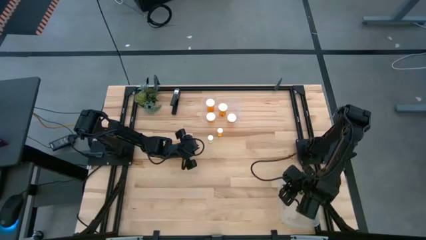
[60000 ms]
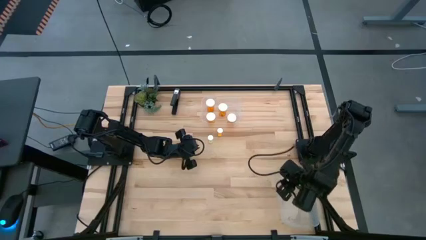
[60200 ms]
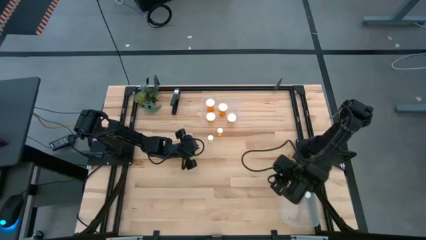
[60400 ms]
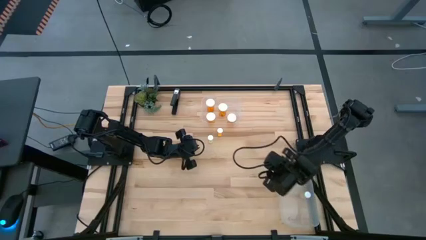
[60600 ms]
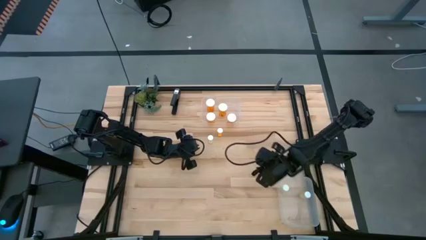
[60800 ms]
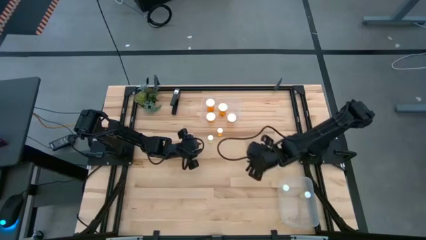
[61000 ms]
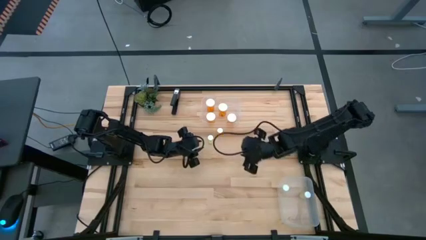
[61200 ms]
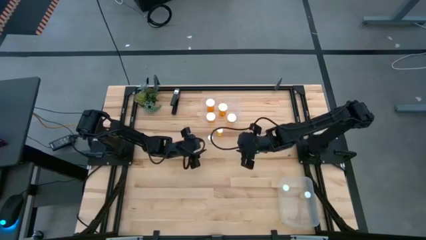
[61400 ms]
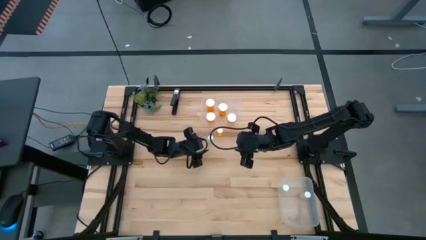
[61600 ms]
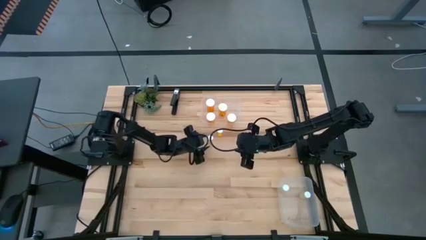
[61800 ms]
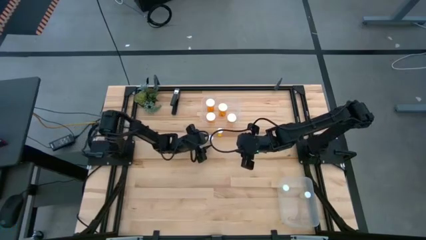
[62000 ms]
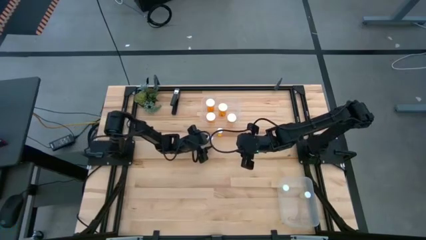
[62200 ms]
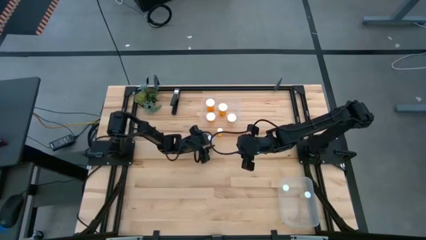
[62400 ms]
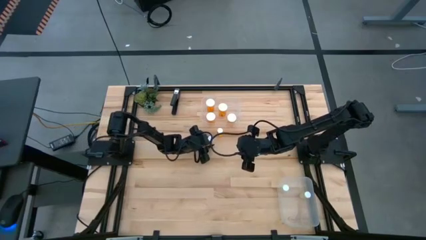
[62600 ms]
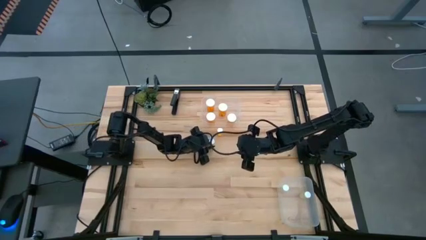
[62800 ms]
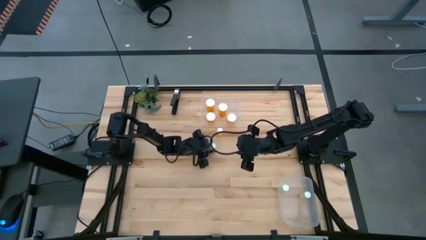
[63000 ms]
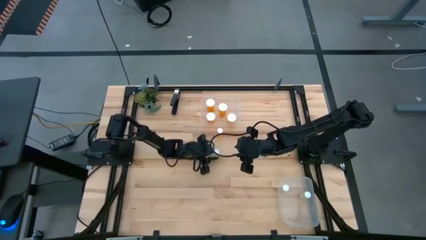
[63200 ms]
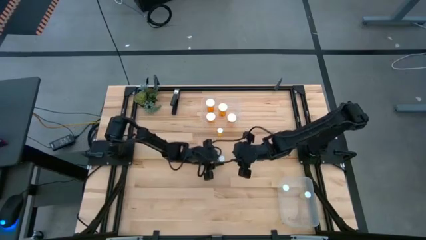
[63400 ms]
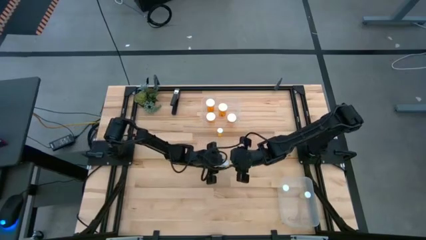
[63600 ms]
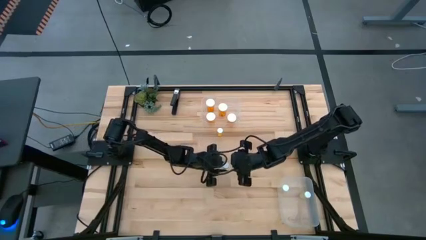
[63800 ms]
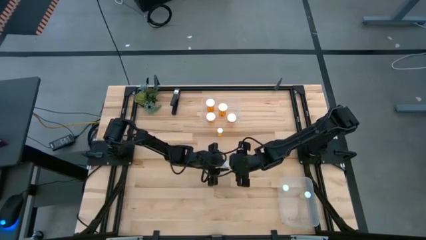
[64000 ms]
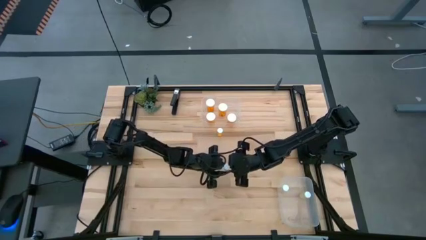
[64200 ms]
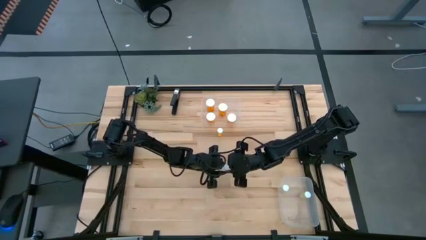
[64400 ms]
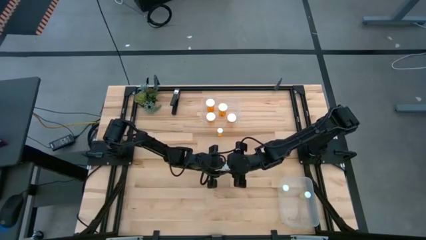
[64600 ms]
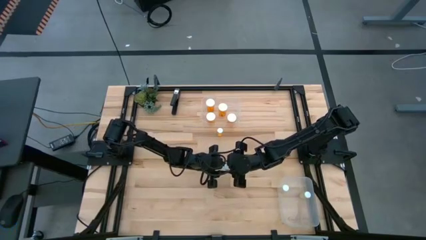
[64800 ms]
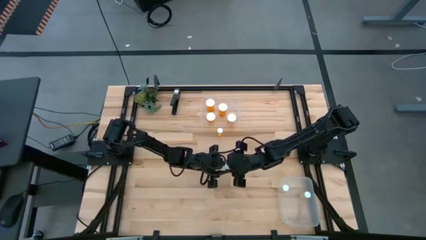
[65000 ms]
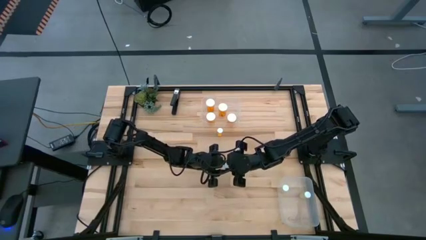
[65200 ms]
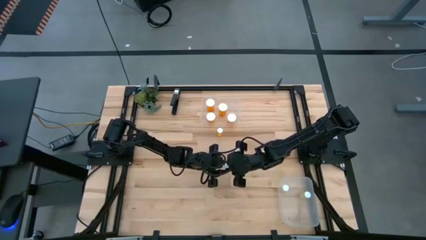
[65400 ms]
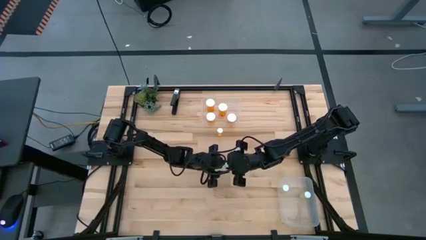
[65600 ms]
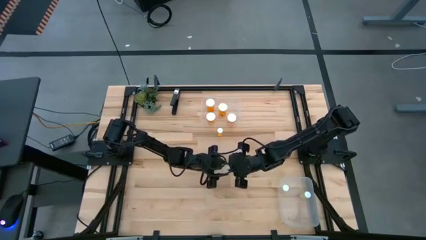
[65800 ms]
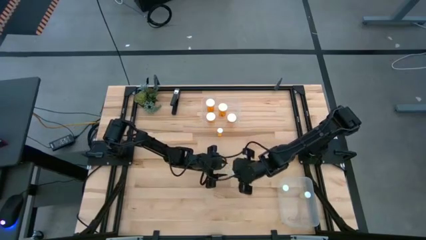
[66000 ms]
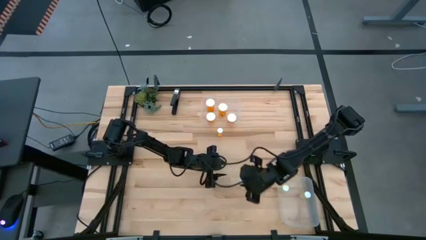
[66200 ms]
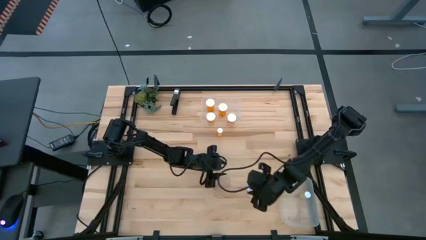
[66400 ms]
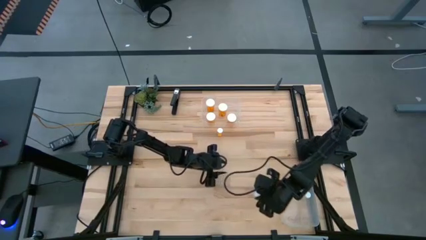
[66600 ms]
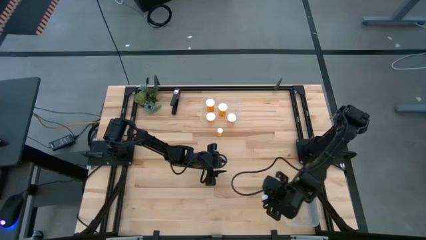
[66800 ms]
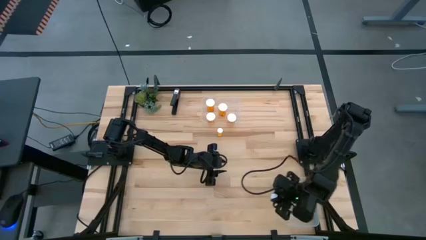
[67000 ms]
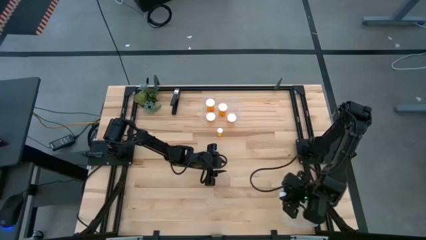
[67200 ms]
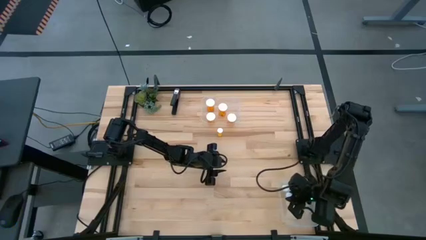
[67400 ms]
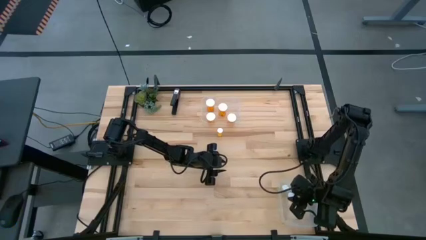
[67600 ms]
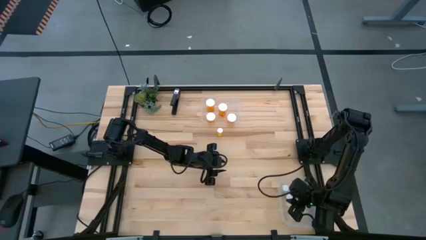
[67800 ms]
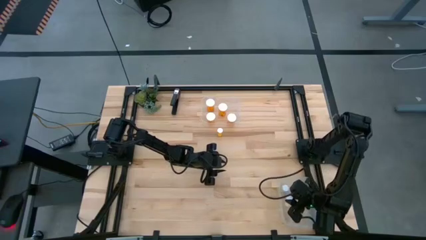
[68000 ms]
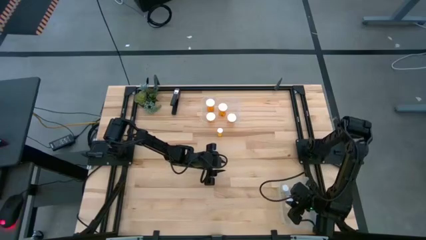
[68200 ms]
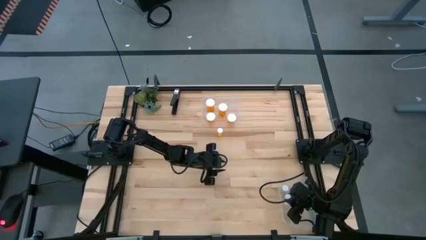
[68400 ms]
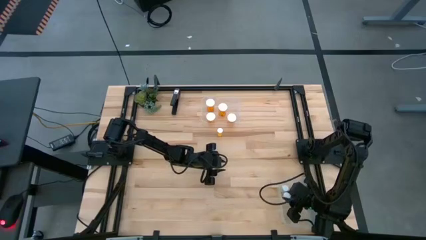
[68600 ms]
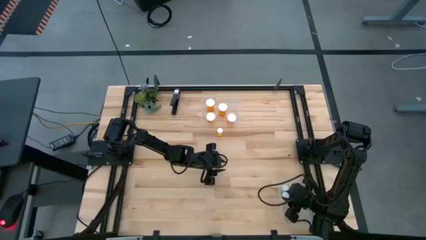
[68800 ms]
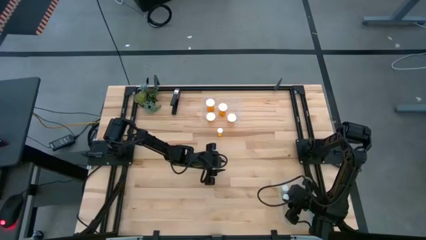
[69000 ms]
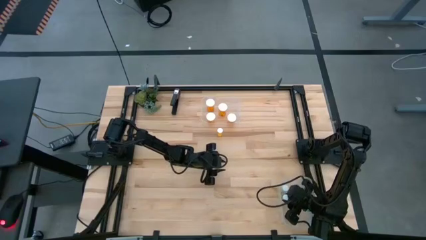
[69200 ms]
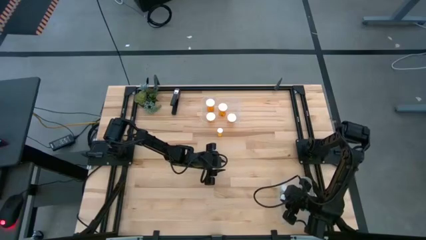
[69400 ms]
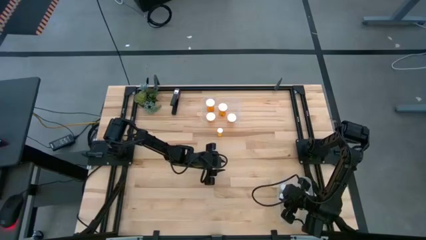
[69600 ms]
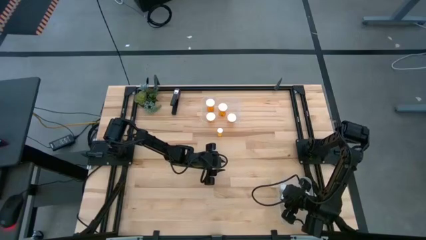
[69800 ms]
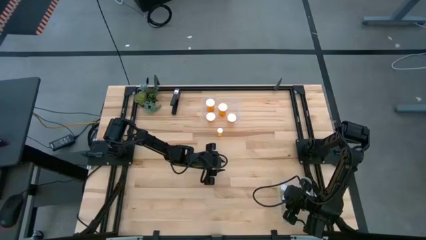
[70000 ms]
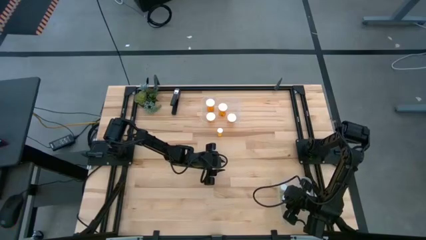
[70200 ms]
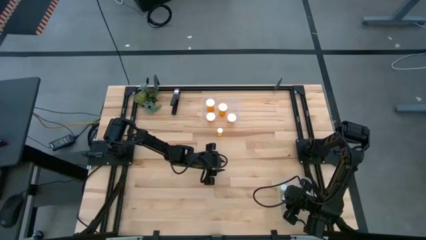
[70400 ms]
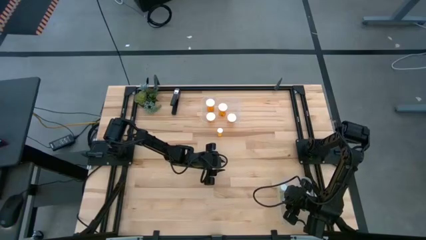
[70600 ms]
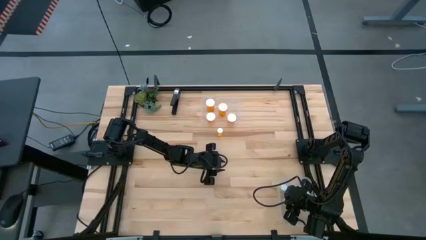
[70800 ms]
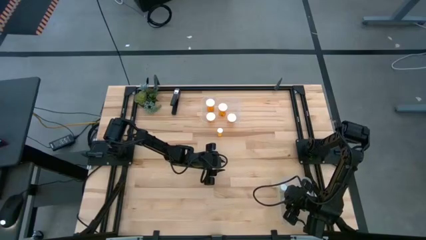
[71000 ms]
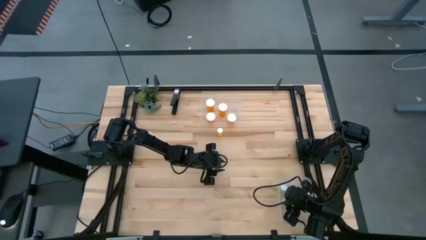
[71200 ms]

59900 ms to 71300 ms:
Task: Pick and place medicine bottles into bin by pill shape (circle, oval)
Put the yellow tablet bottle into the bottom transparent bin

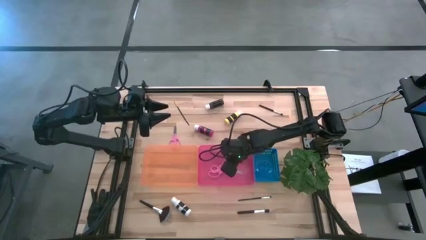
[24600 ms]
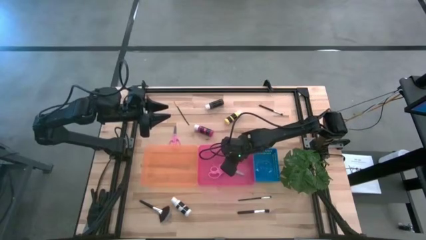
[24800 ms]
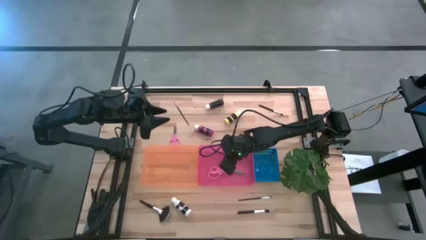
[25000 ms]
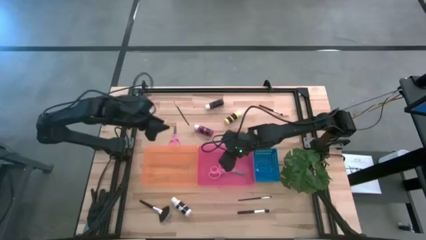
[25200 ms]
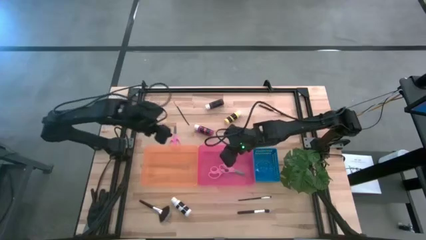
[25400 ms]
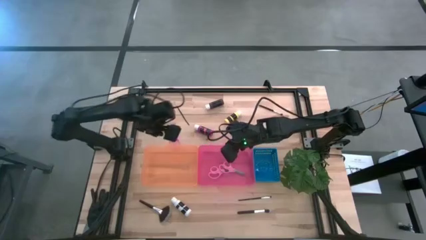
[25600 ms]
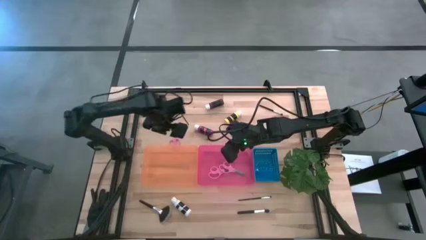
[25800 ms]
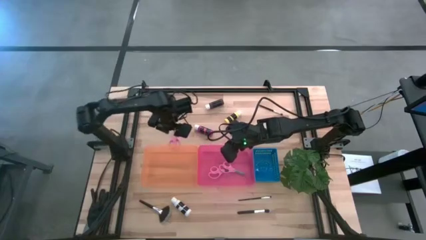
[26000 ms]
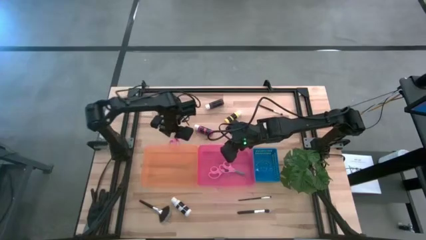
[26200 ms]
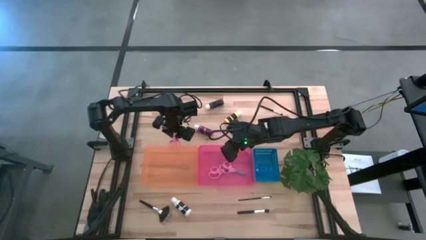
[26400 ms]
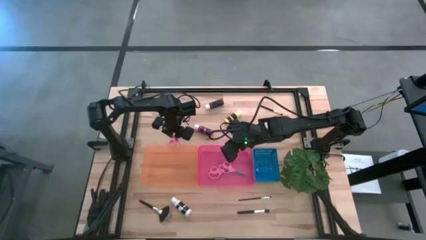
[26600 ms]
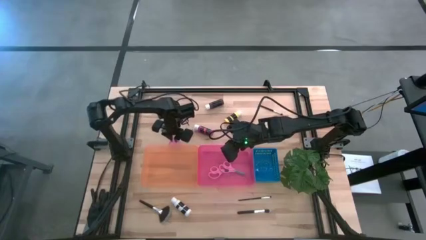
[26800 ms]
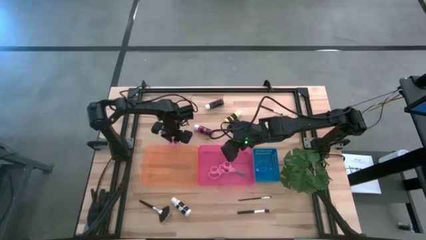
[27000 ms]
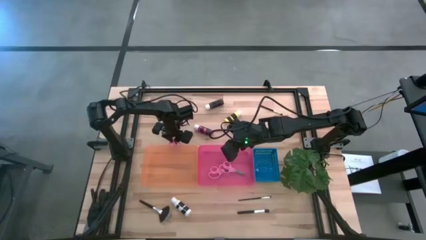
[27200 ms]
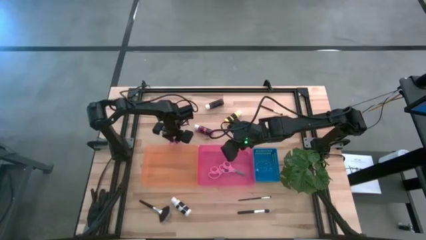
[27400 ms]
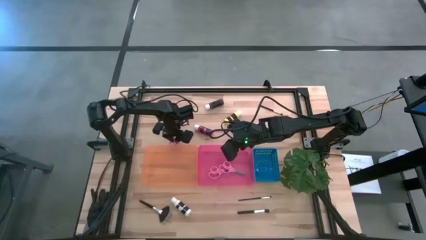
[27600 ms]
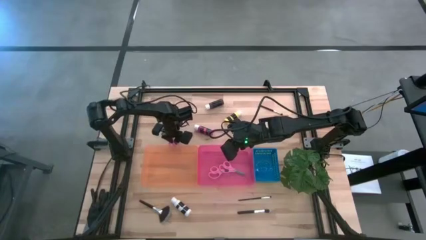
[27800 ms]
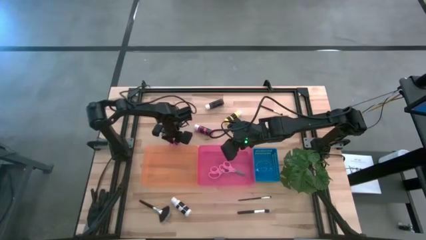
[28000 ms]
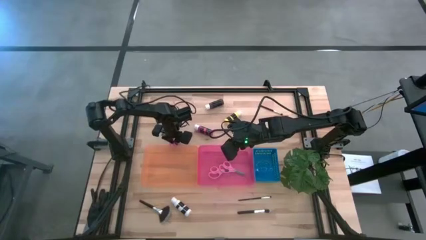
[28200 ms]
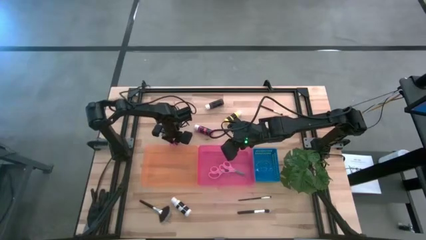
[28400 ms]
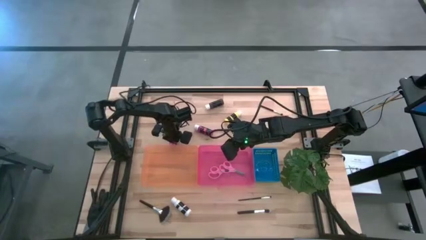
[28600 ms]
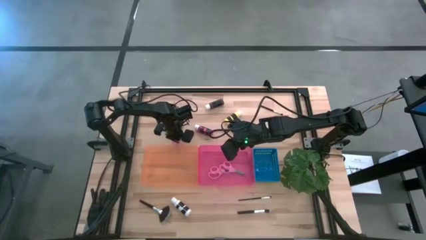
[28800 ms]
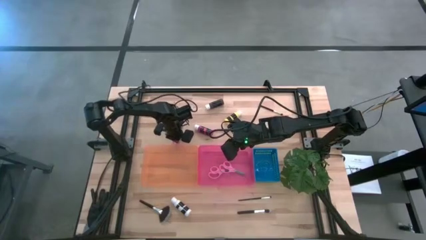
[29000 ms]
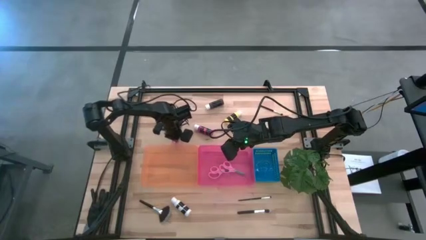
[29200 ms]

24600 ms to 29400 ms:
Task: Pick & Place Paint Supplies
Put the pink scissors into the pink bin
